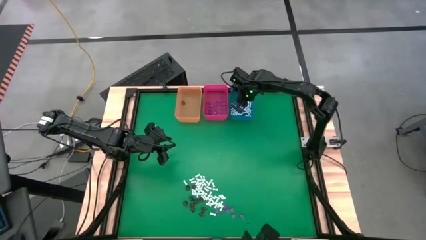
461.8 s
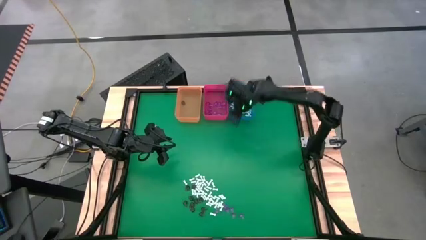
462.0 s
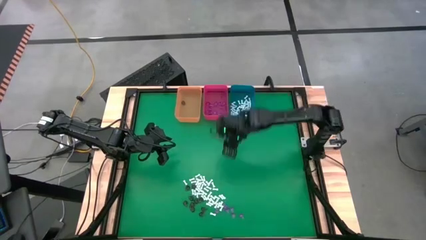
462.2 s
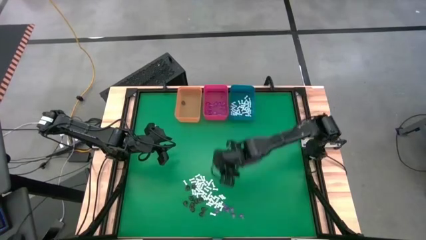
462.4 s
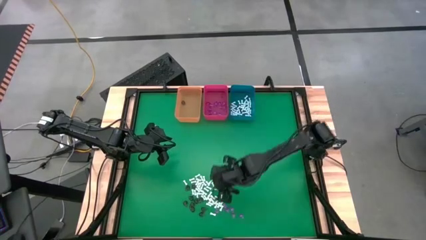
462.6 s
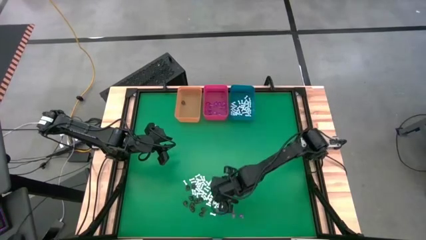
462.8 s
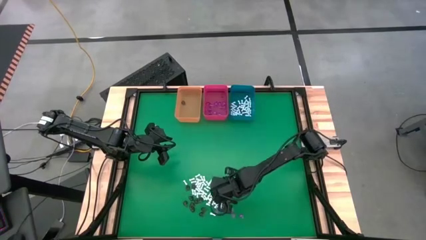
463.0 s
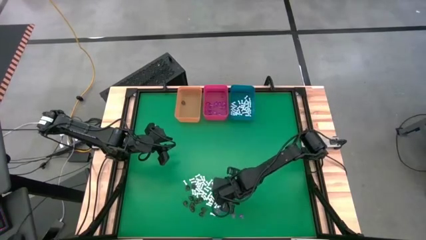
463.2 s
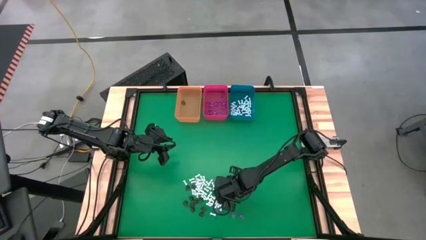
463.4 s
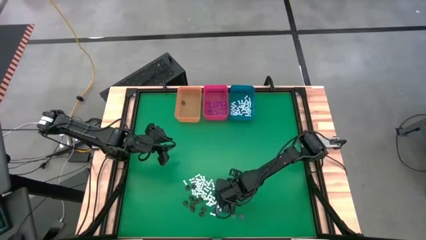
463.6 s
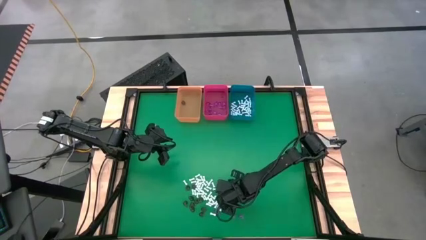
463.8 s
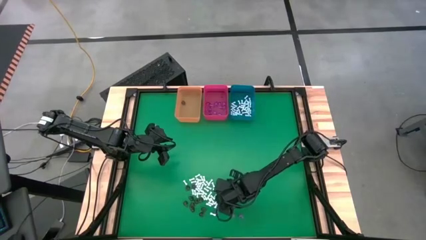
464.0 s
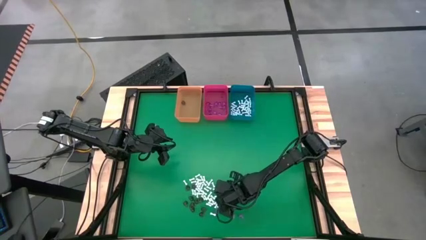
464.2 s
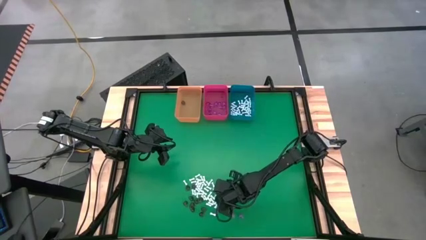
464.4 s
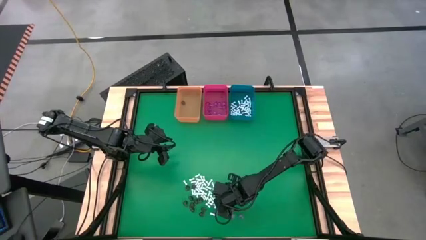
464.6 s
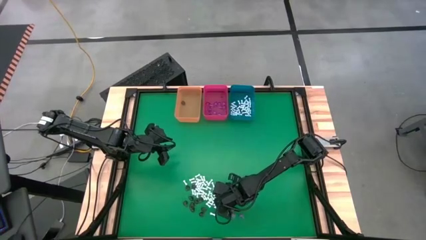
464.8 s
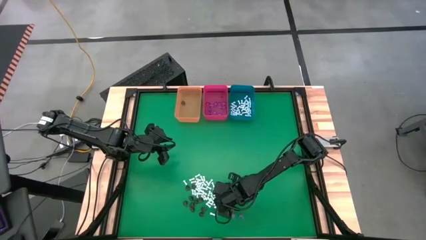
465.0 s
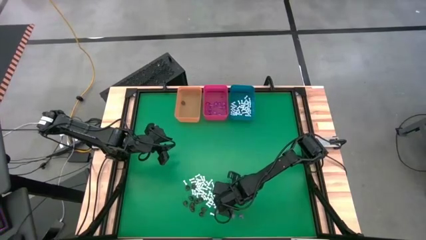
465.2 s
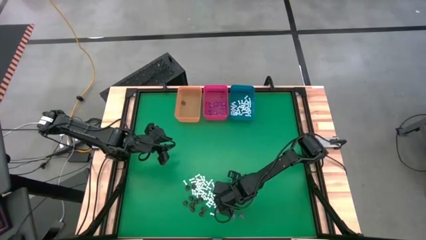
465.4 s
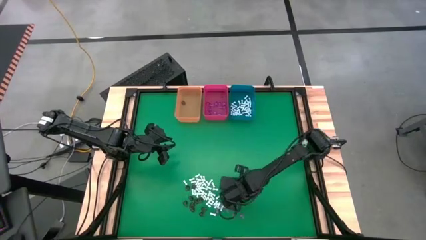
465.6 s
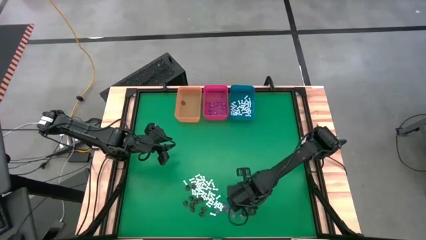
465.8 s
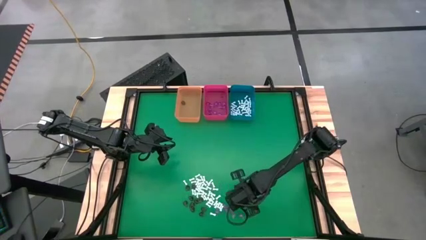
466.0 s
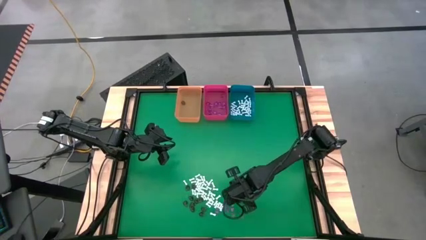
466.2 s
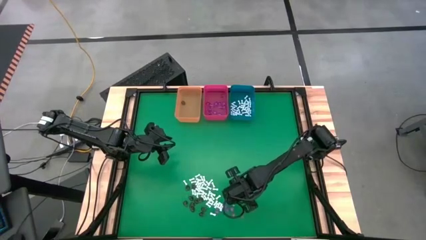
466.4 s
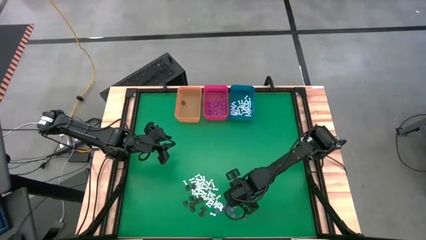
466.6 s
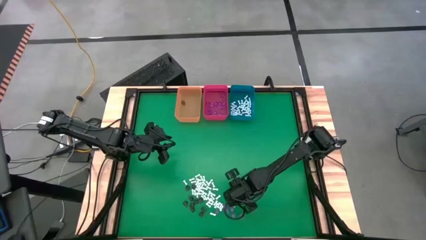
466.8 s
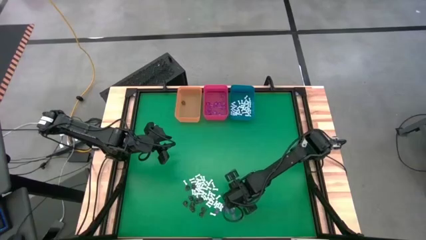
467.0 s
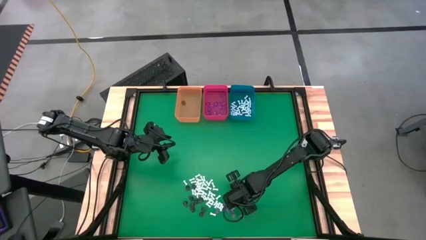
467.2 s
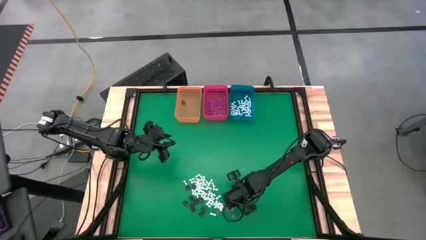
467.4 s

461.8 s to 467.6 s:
Task: Sort Halloween decoration
Put the white bone toy into the blue bin

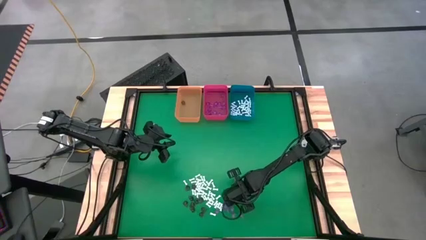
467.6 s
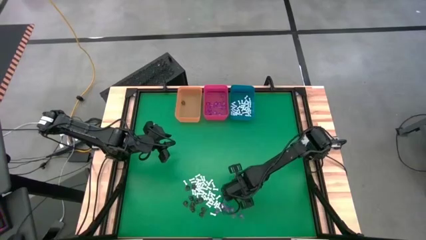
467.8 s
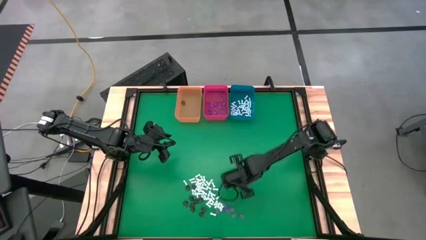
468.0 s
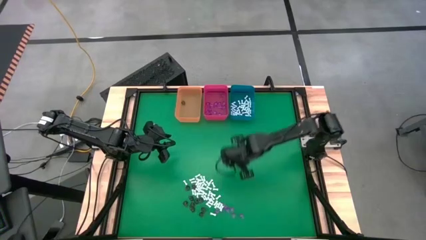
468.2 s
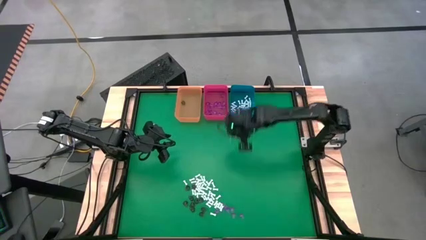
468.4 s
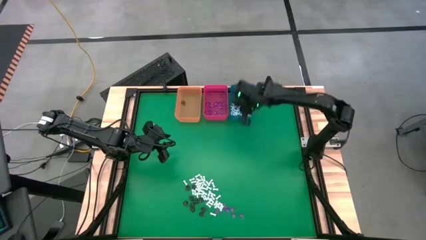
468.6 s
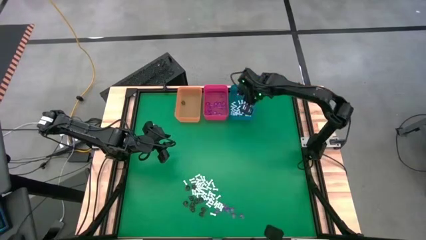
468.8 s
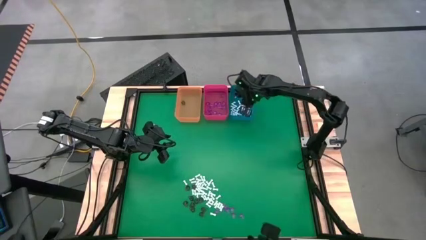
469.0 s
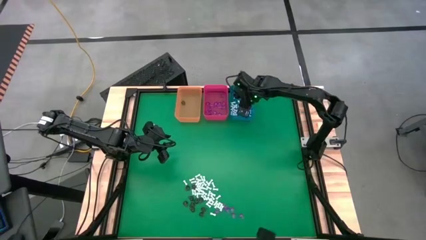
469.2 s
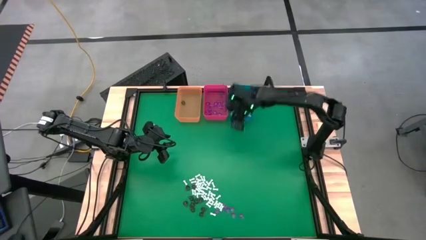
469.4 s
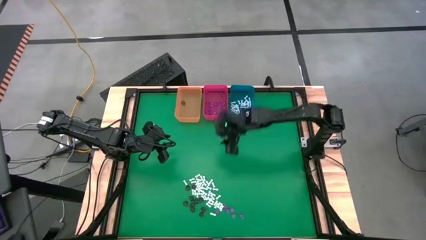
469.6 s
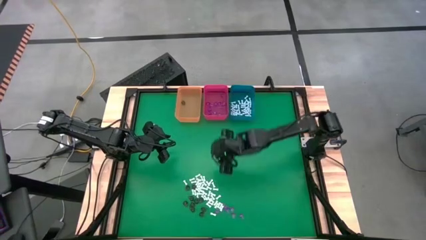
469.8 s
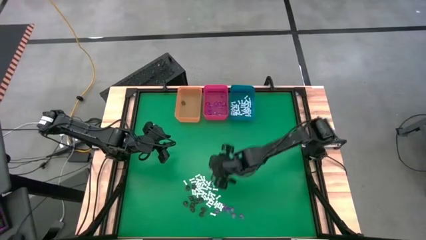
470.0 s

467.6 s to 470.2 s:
Put the white bone toy into the blue bin

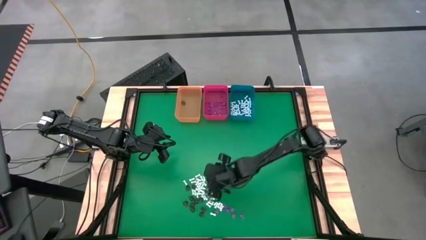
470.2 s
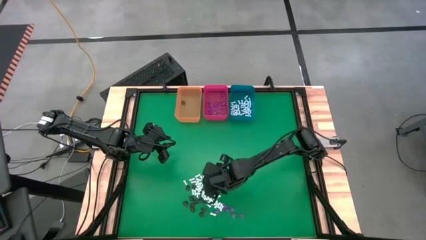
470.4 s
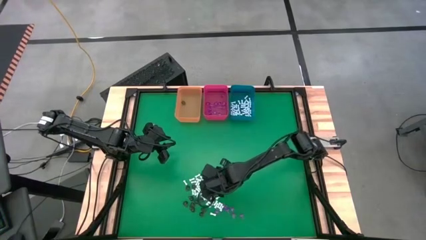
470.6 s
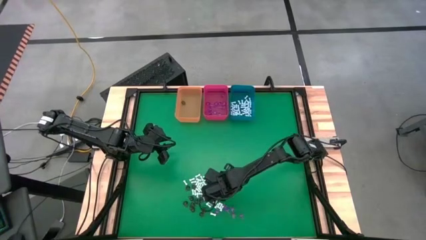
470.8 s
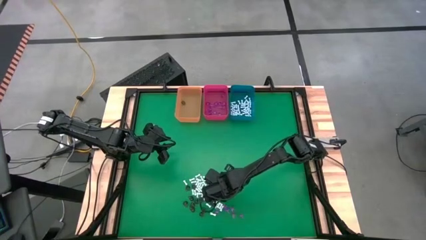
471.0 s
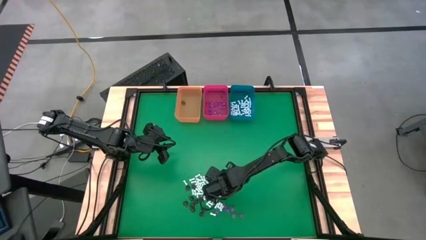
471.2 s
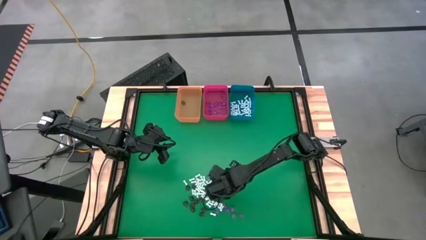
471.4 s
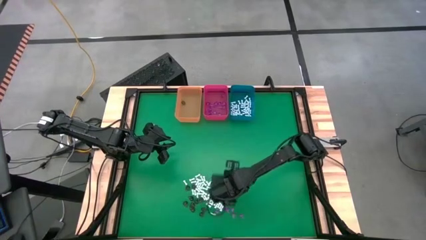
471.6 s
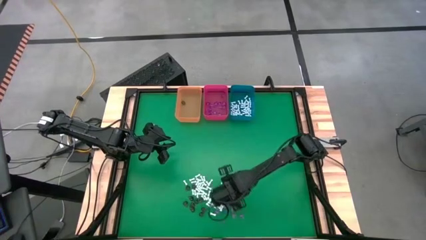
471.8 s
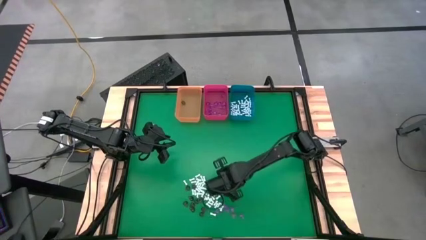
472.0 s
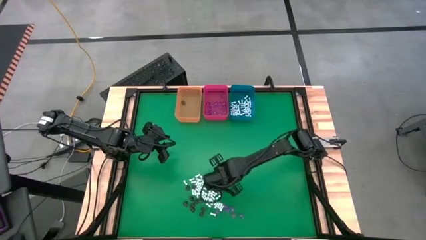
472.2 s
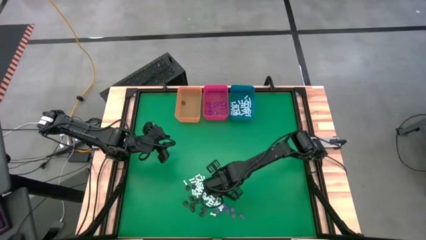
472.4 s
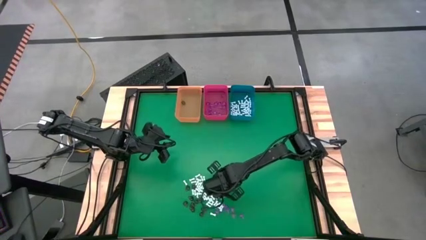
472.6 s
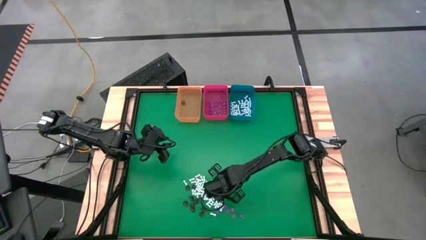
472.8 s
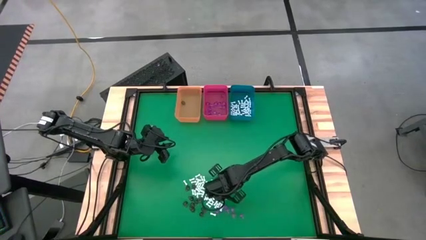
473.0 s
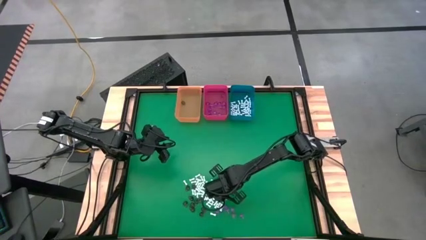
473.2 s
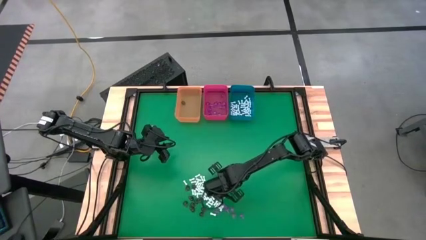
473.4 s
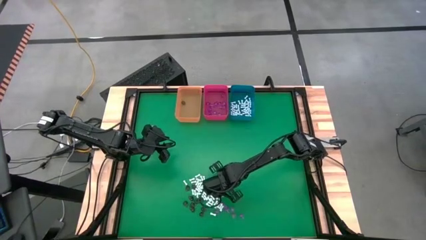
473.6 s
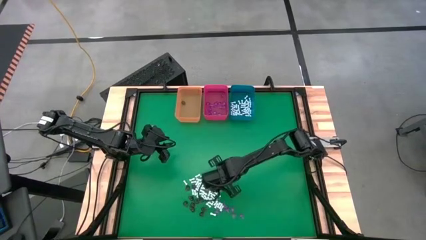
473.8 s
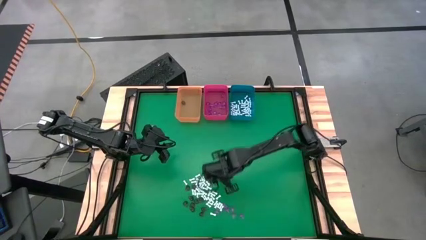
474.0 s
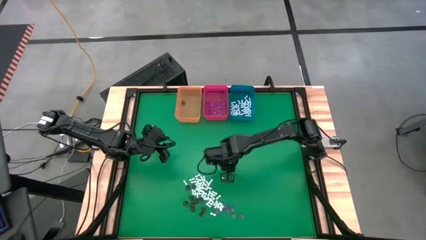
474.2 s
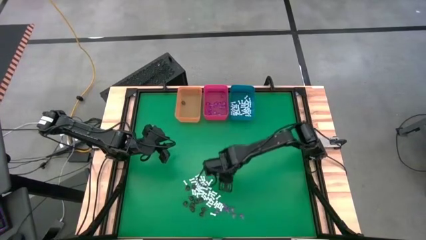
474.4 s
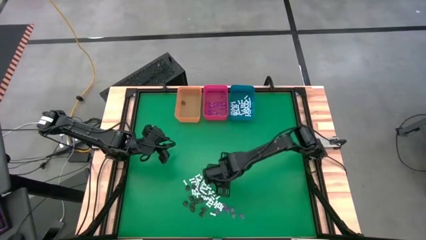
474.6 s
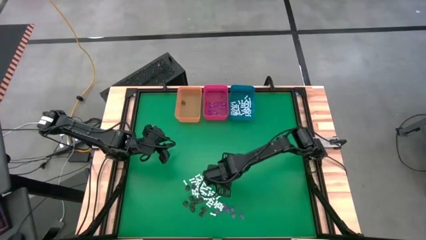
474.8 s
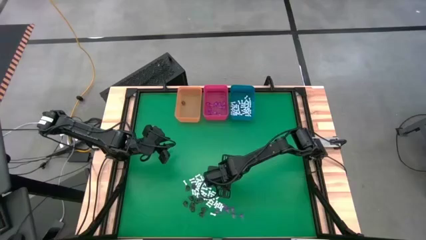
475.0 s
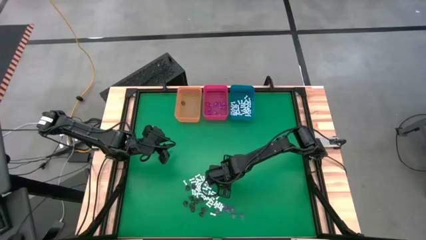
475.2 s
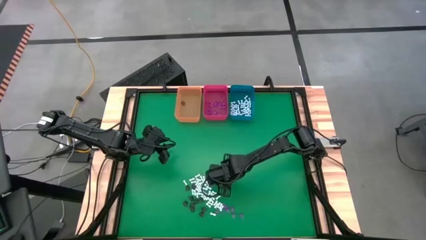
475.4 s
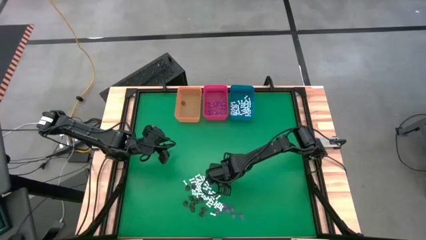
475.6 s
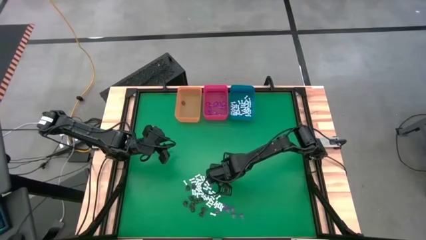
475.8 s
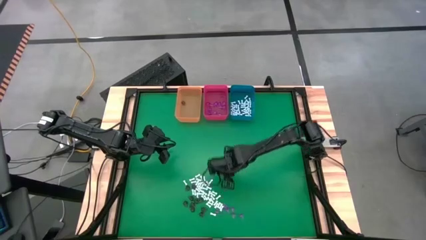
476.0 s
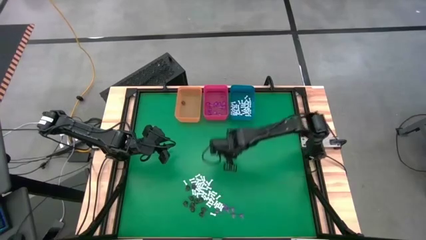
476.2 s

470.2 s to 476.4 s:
Put the white bone toy into the blue bin

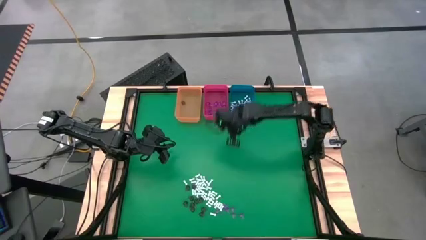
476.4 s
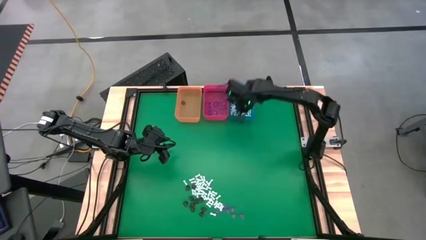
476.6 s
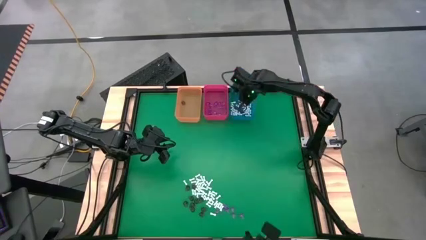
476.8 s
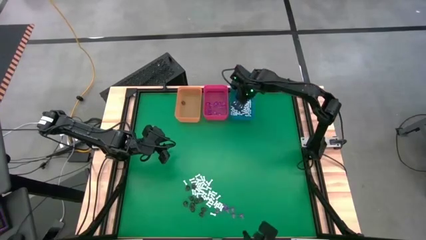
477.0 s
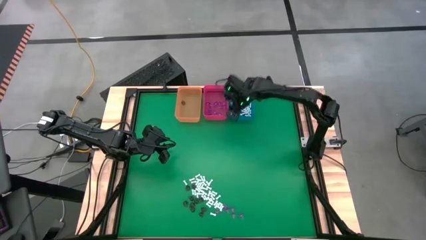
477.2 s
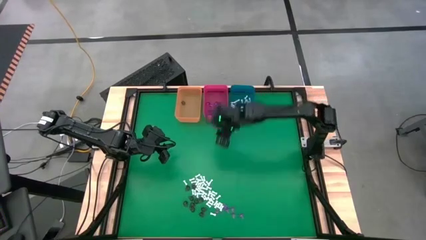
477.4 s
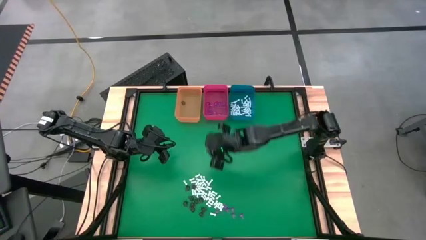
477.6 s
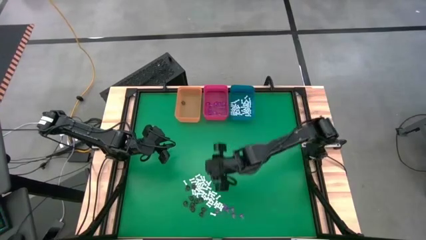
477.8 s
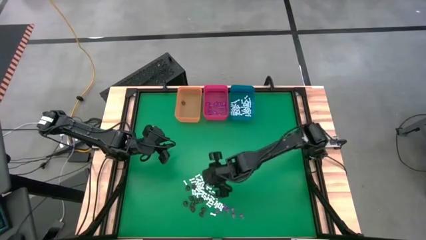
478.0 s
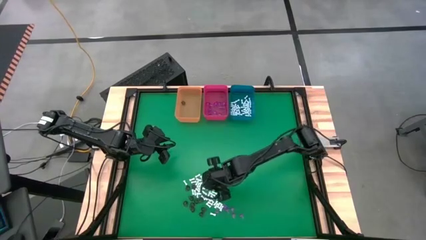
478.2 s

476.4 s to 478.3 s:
Put the white bone toy into the blue bin
